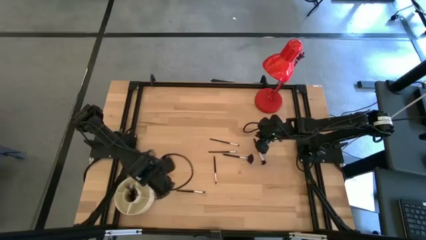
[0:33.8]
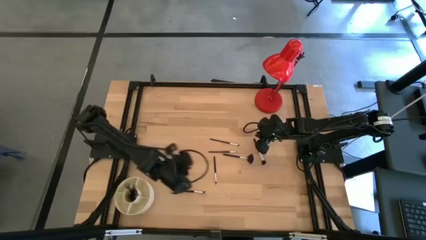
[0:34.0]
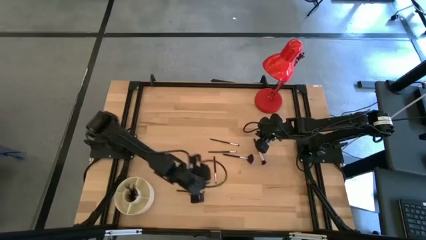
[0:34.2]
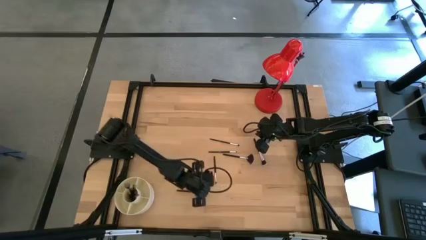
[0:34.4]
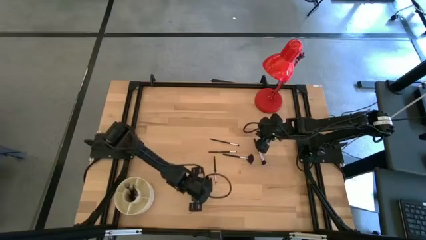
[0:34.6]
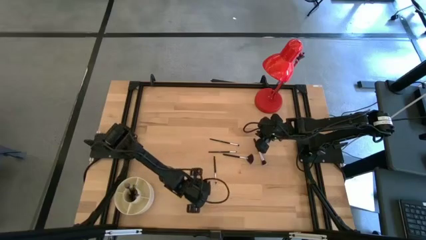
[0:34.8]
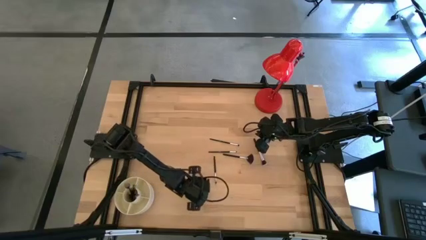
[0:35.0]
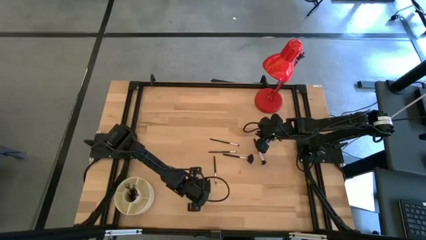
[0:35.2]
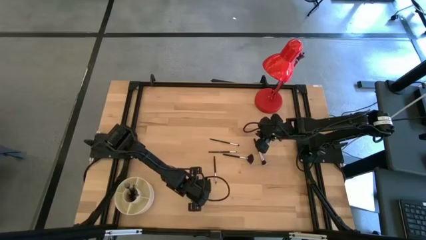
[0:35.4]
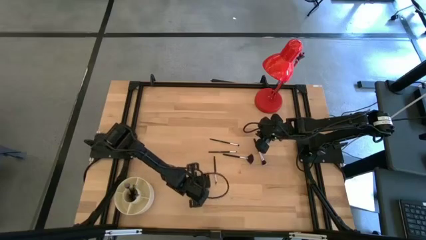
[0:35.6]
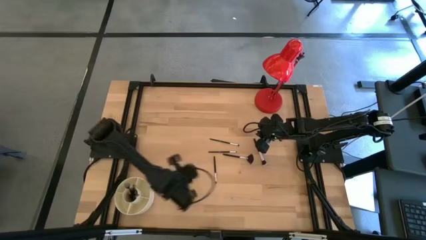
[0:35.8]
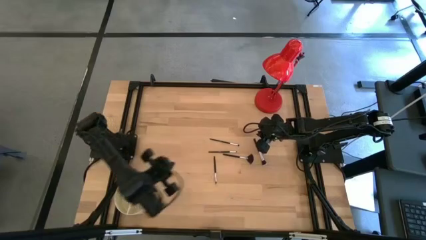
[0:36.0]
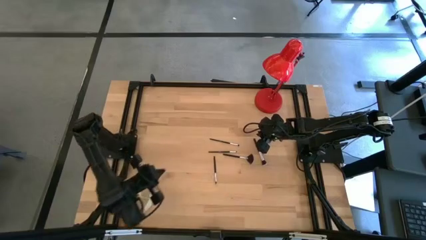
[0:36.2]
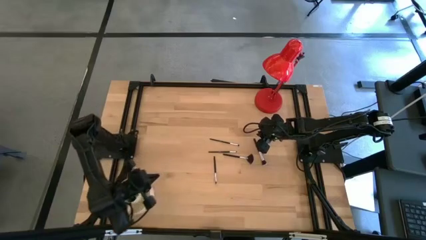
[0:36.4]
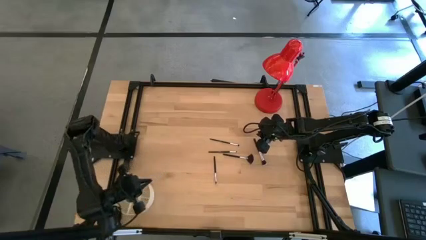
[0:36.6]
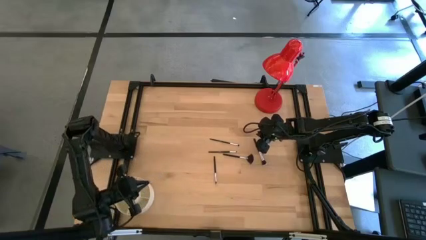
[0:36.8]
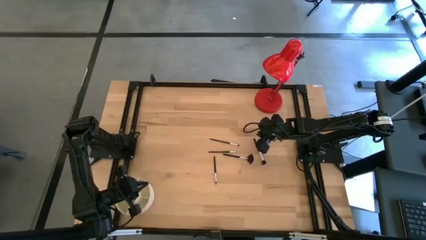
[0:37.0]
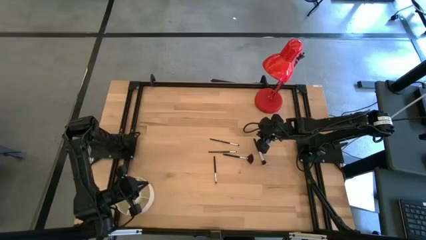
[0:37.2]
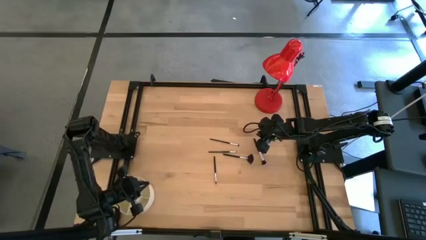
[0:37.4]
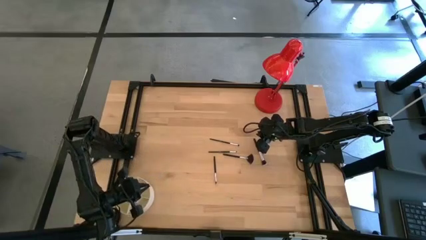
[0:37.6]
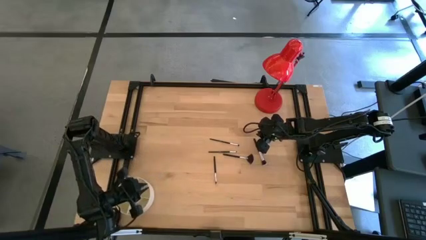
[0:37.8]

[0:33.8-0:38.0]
Task: Pick & Place Makeup Brushes
Put the black eyeshadow brush into the makeup organizer

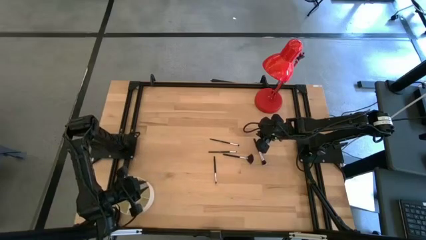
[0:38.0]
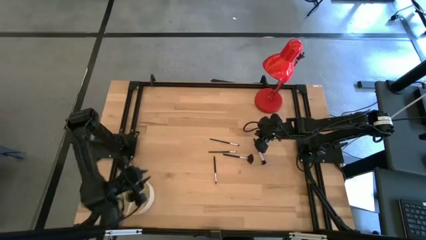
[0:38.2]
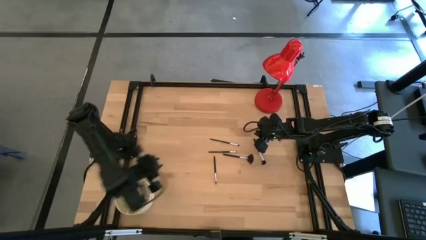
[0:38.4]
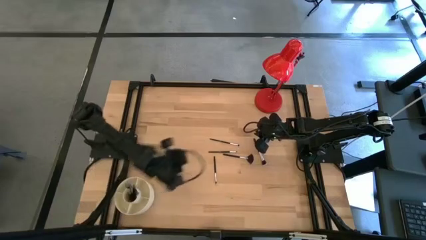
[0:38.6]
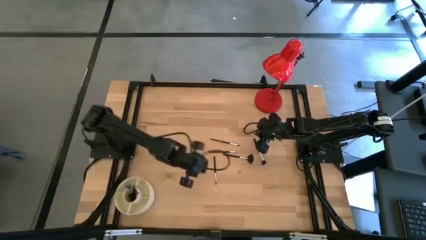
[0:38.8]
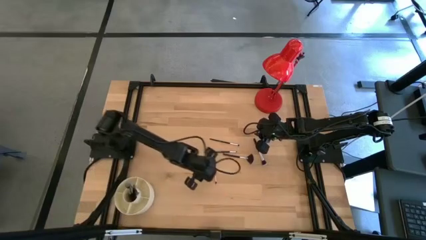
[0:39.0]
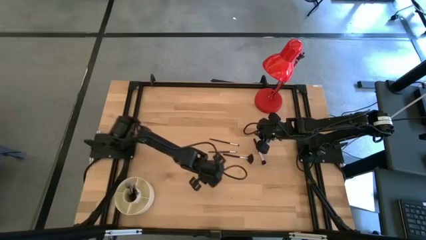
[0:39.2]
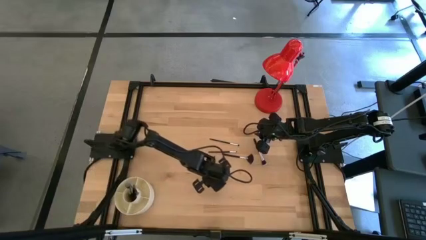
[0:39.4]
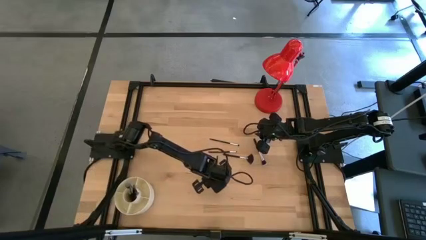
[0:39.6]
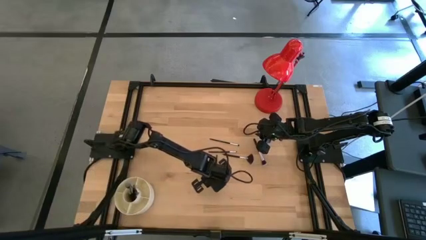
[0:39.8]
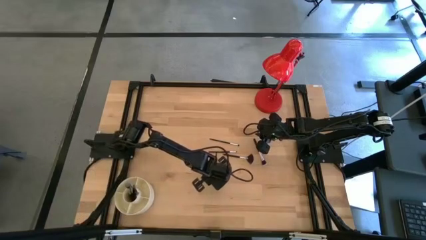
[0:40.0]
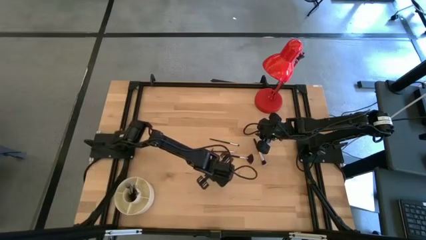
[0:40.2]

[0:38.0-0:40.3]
Put the black eyeshadow brush into the makeup organizer

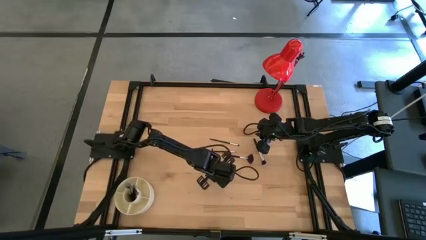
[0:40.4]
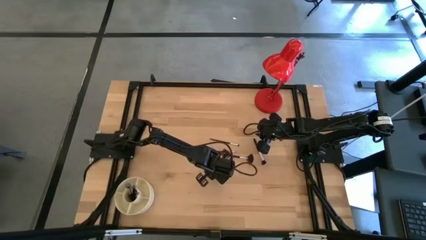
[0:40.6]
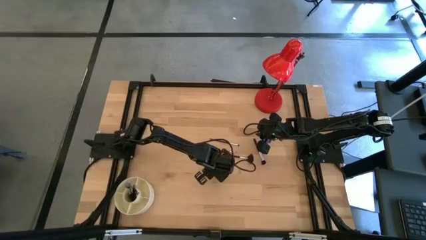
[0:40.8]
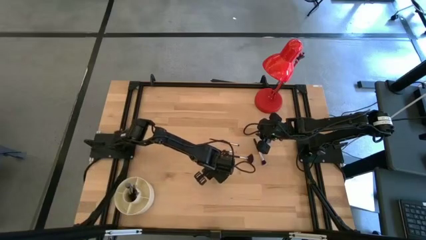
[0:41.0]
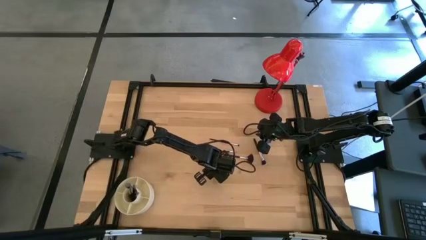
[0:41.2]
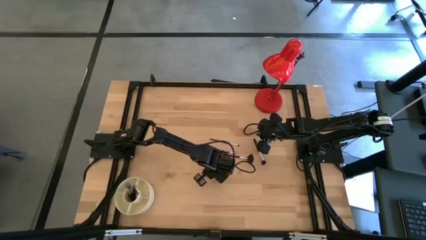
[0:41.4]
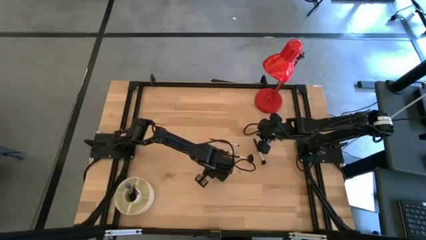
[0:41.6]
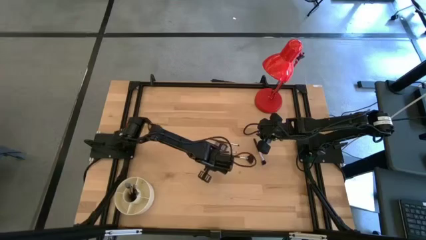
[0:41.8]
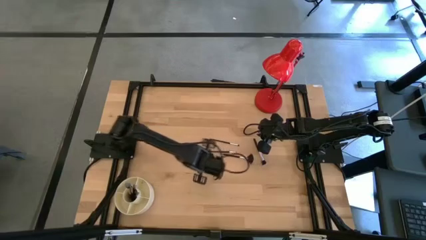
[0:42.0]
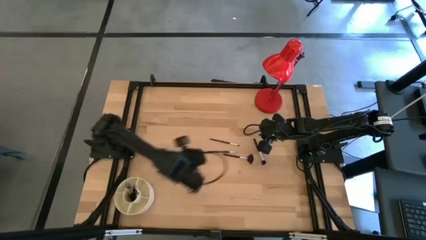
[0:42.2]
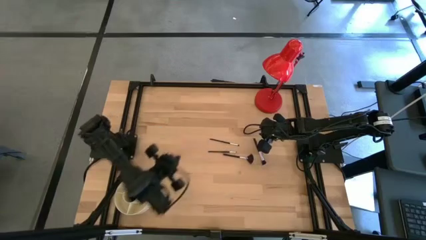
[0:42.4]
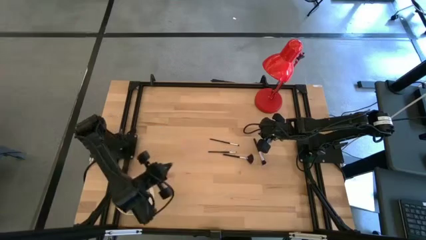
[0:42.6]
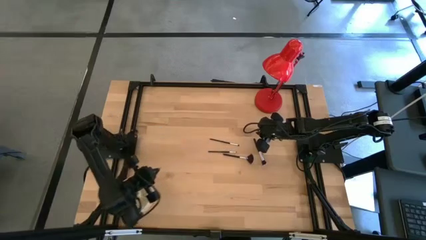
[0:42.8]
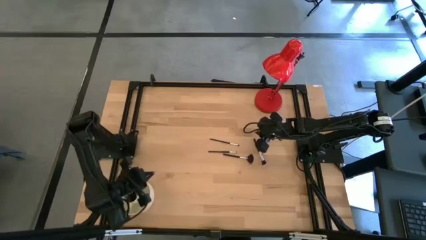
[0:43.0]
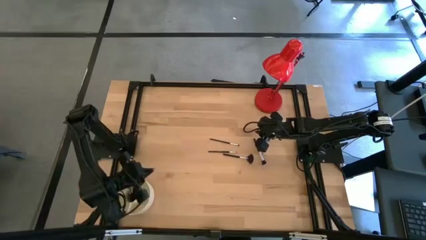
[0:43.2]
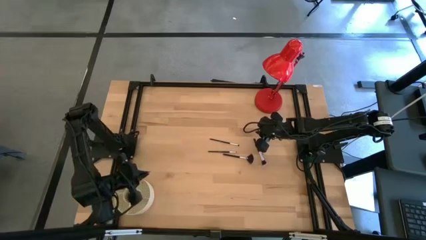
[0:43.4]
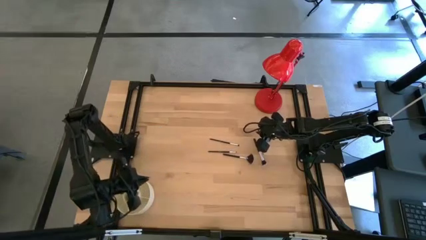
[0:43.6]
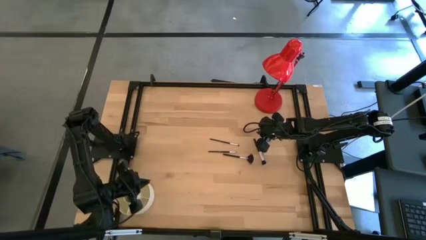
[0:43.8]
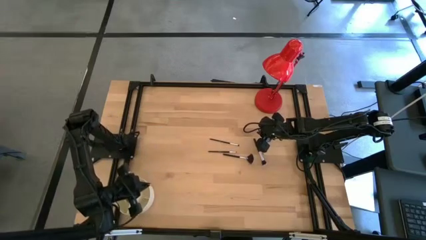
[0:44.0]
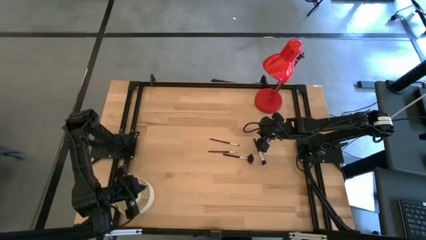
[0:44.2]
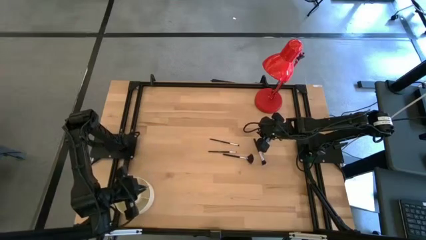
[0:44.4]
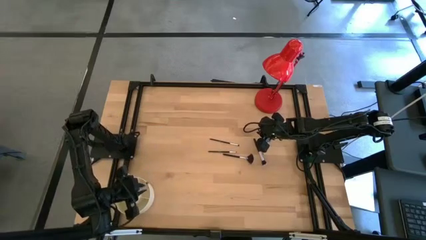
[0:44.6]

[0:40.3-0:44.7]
Put the black eyeshadow brush into the makeup organizer

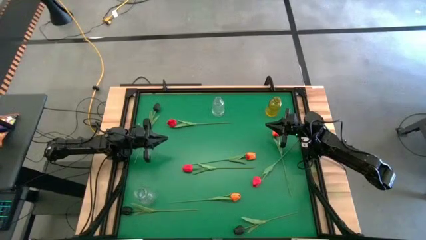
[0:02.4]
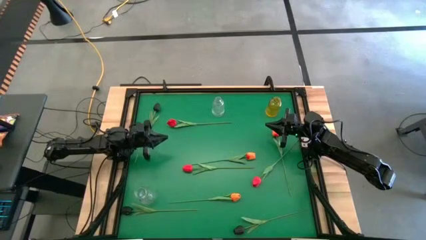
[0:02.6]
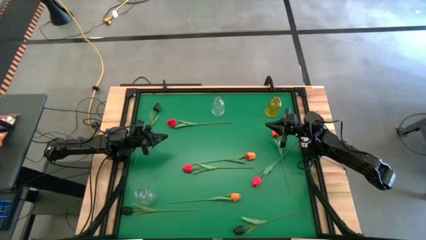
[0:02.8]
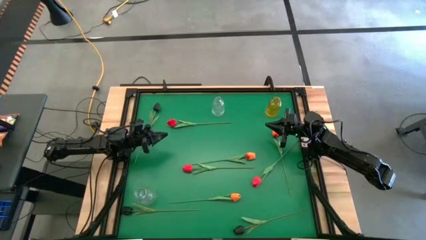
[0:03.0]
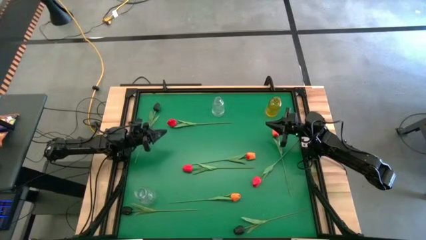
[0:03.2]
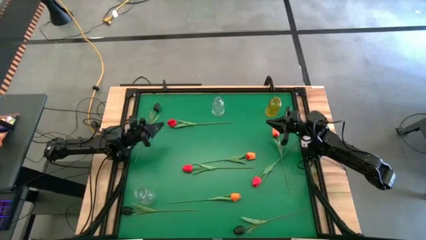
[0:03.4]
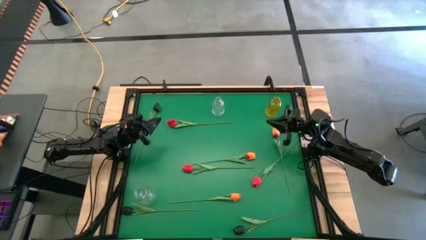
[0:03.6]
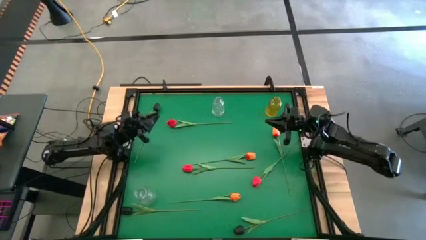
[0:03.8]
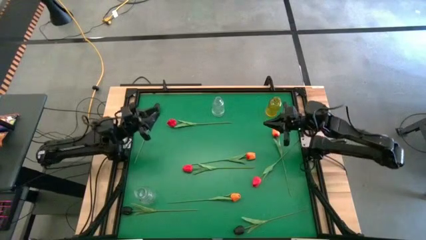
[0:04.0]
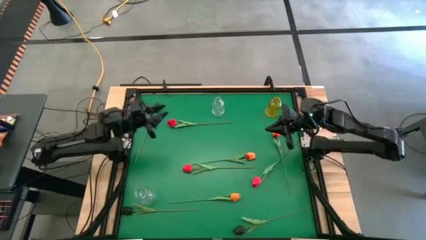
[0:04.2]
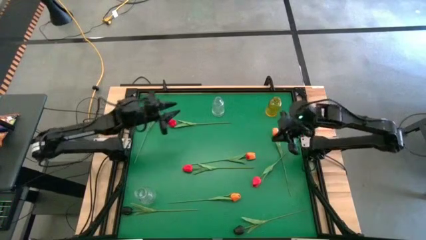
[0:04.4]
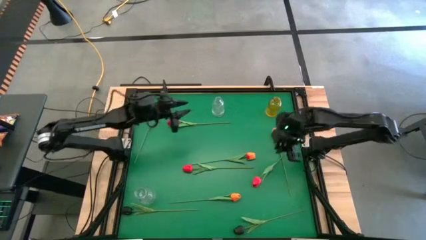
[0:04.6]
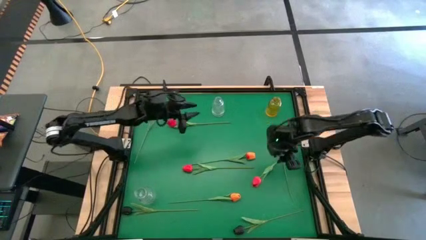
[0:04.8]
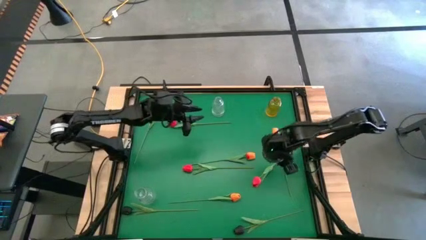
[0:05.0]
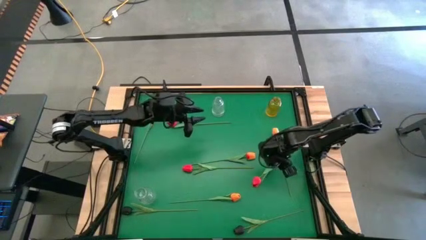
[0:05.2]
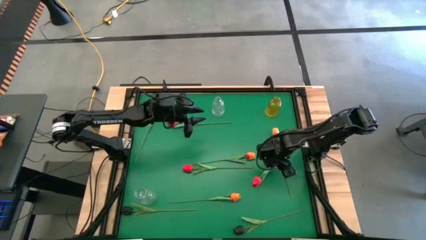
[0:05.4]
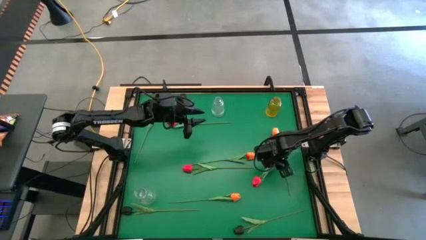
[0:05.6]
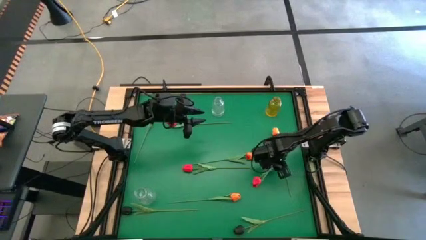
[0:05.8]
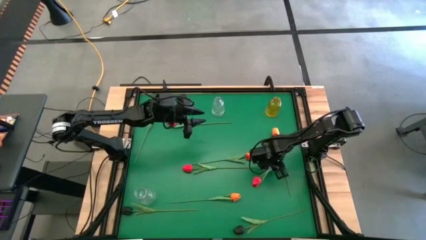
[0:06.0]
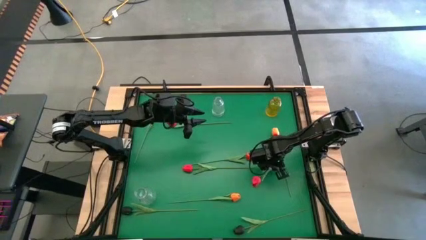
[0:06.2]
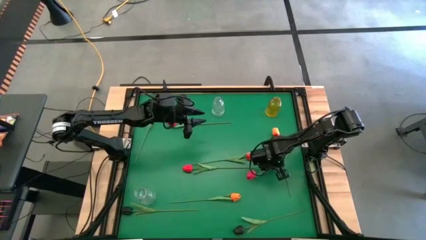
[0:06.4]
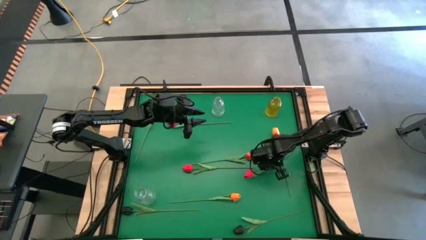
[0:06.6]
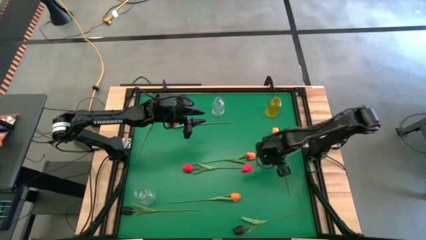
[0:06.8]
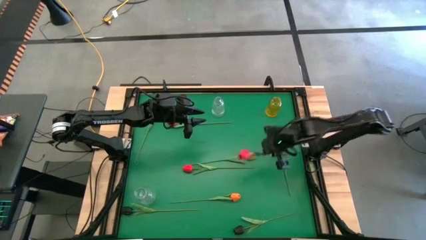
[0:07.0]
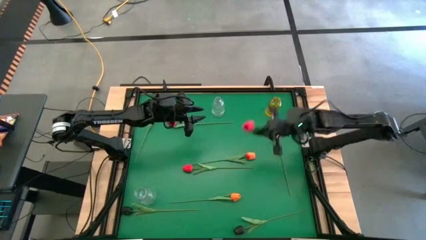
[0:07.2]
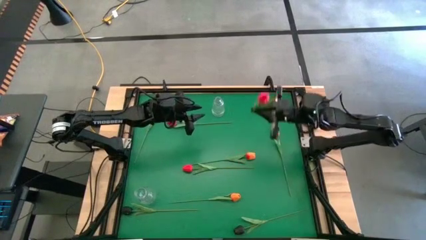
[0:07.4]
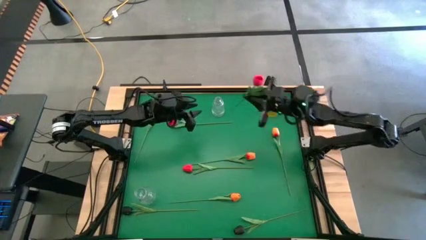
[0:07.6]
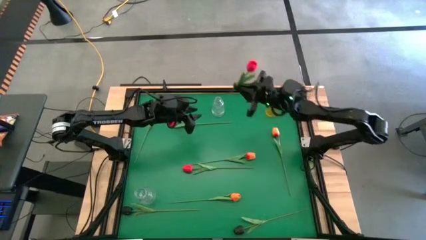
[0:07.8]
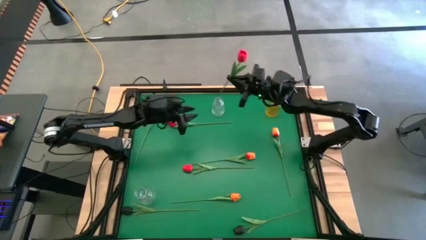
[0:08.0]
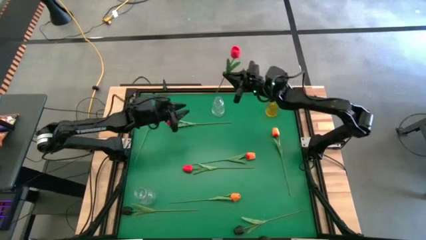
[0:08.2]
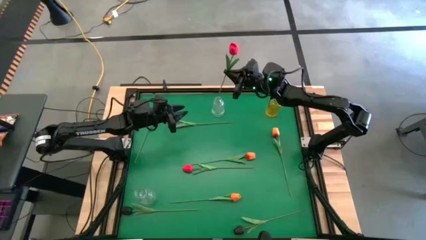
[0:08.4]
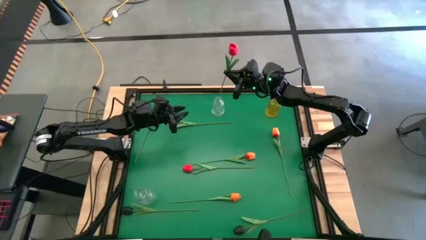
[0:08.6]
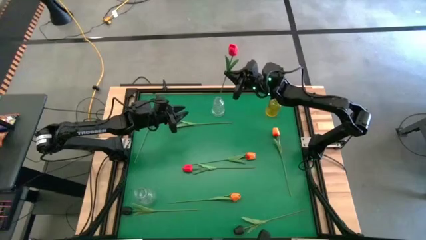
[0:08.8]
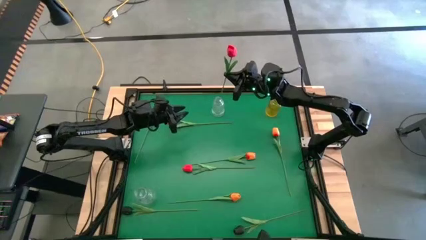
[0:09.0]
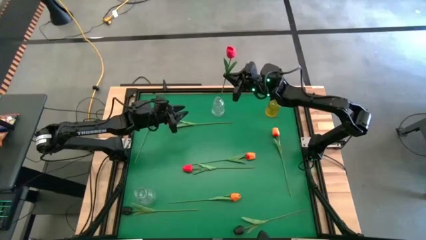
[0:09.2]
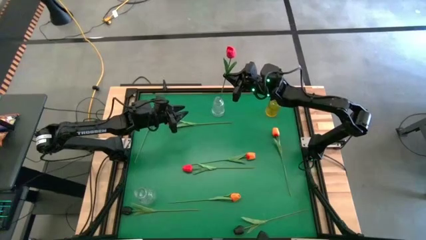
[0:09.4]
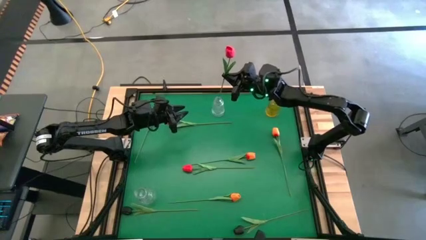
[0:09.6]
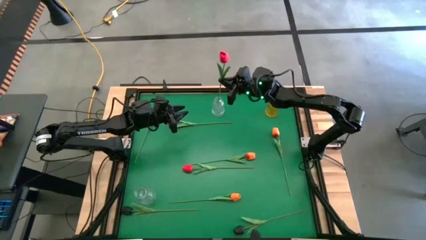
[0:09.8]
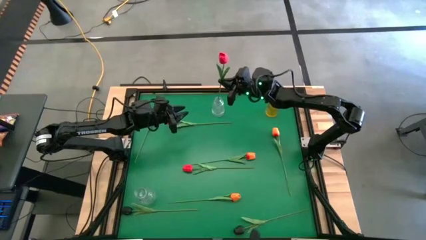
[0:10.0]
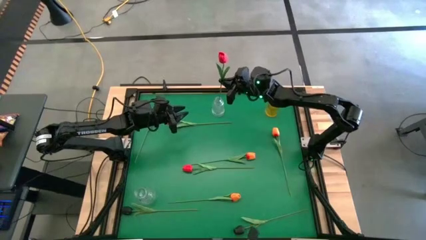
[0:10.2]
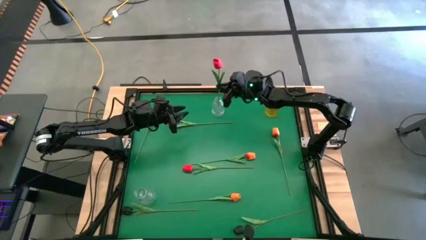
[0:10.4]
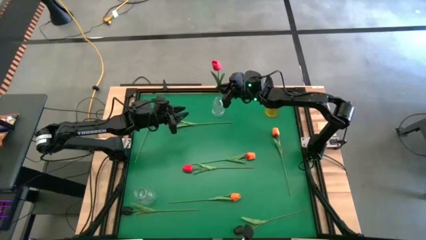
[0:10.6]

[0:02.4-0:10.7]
Task: Sort flowers into vase by color
Put the bottom right red flower into the top transparent vase
